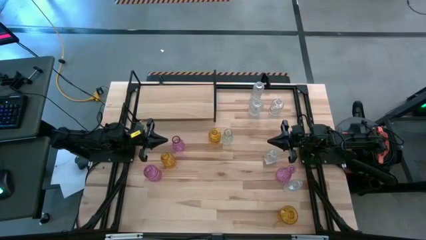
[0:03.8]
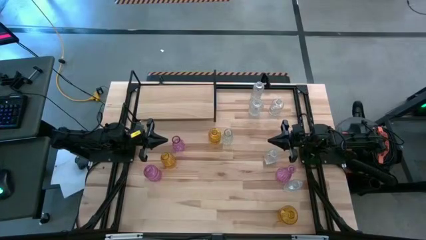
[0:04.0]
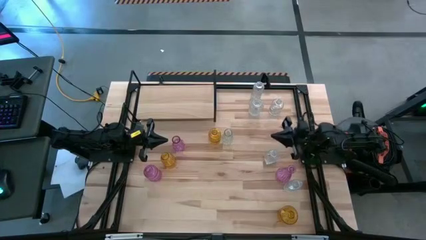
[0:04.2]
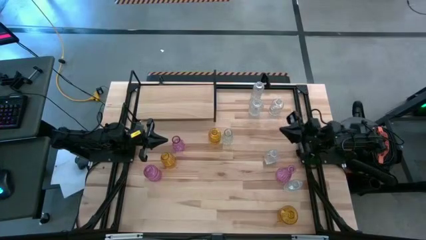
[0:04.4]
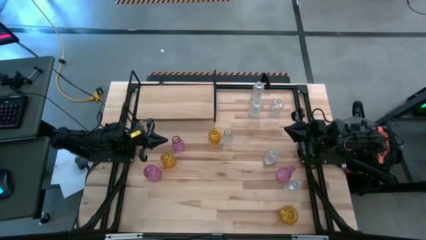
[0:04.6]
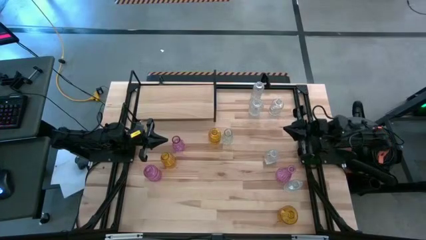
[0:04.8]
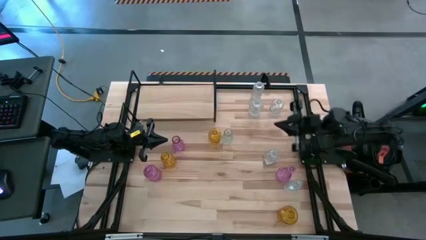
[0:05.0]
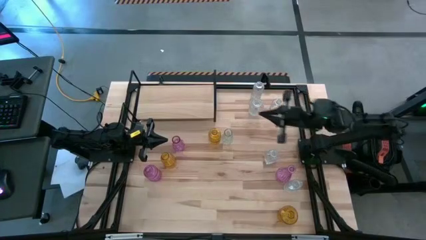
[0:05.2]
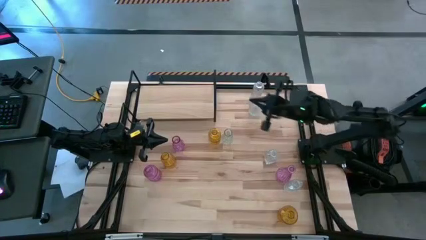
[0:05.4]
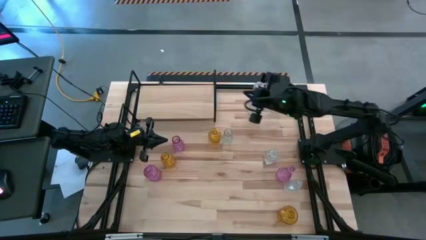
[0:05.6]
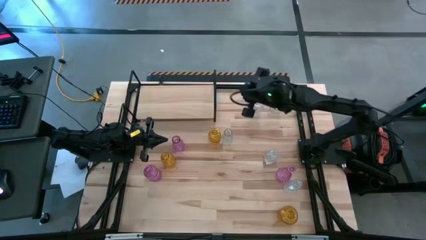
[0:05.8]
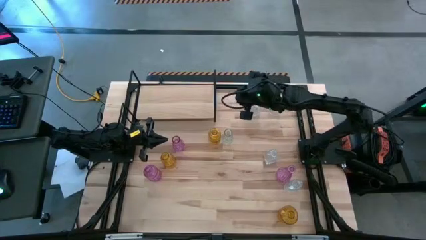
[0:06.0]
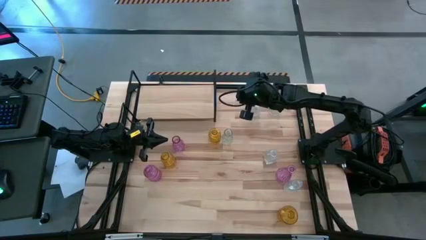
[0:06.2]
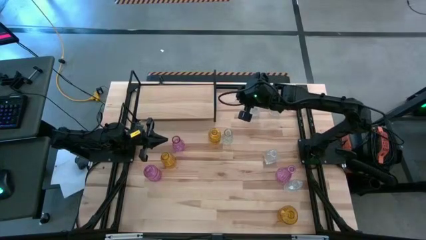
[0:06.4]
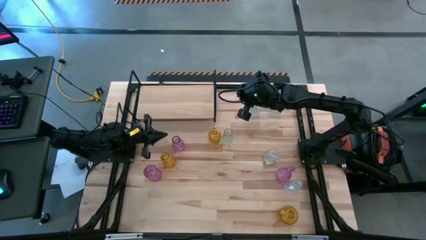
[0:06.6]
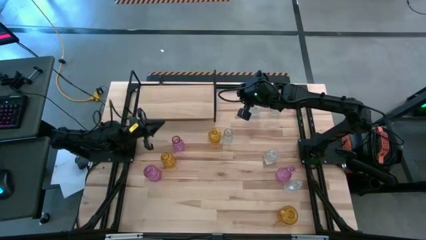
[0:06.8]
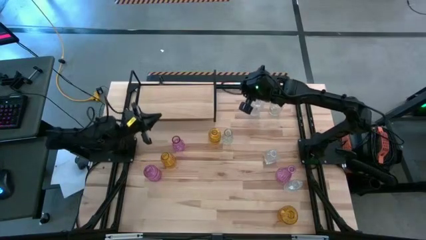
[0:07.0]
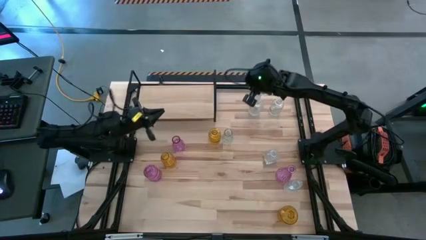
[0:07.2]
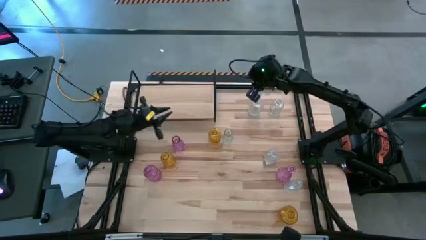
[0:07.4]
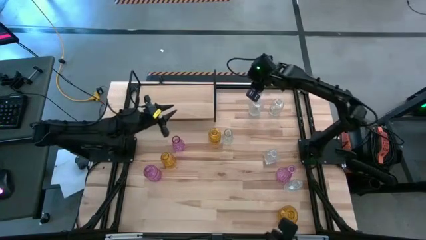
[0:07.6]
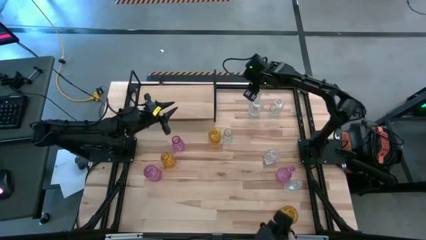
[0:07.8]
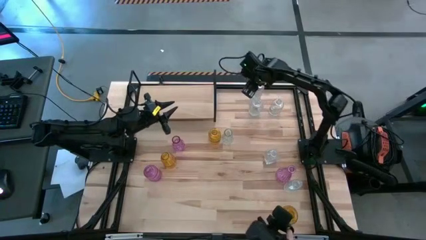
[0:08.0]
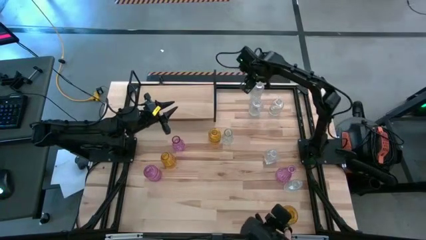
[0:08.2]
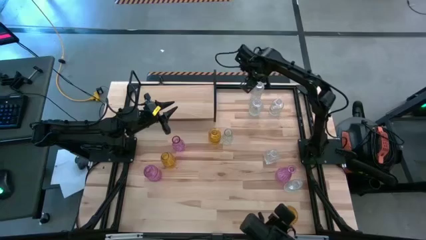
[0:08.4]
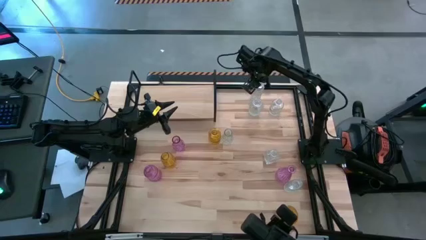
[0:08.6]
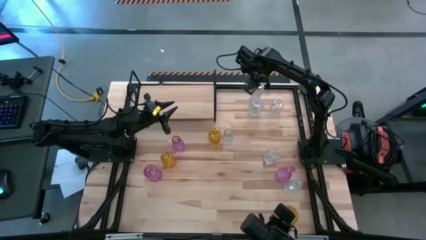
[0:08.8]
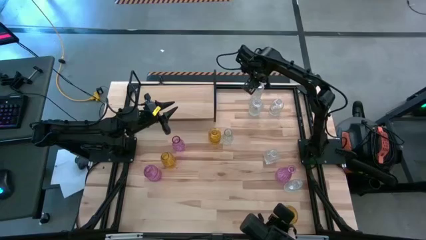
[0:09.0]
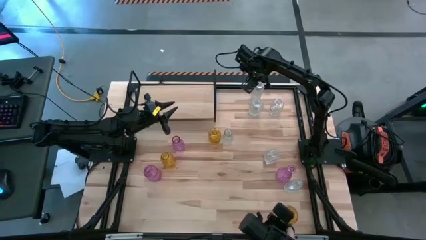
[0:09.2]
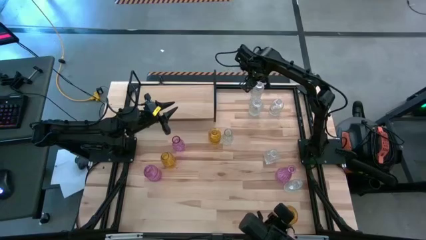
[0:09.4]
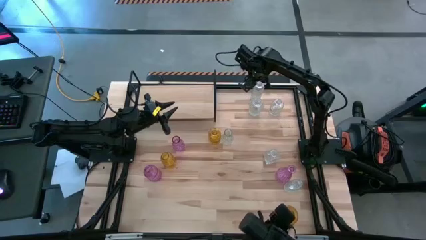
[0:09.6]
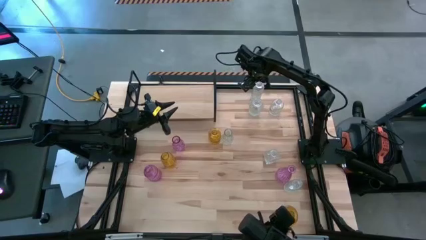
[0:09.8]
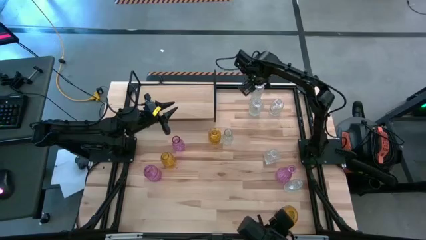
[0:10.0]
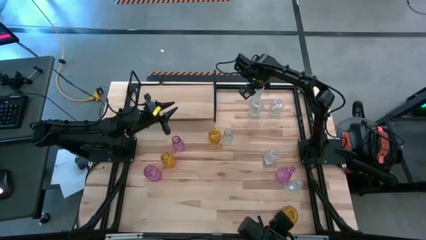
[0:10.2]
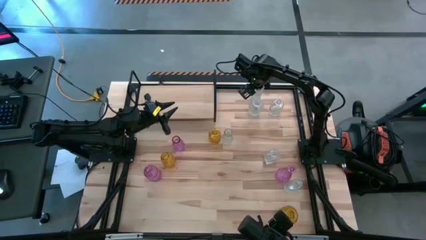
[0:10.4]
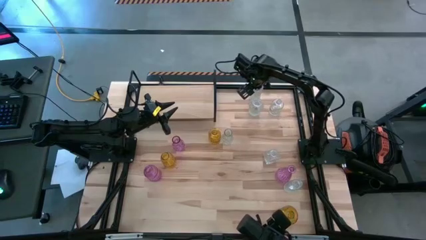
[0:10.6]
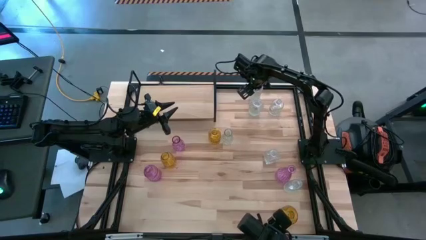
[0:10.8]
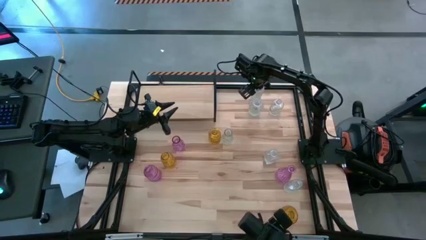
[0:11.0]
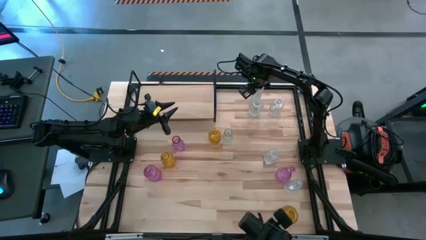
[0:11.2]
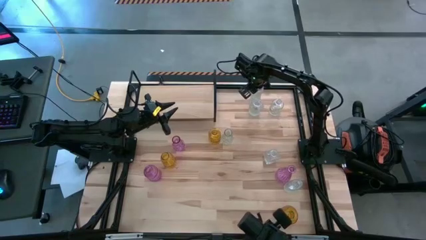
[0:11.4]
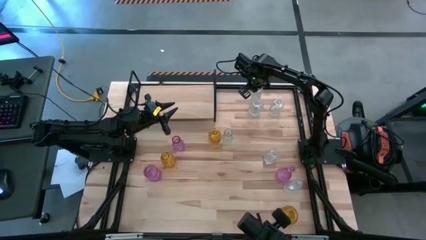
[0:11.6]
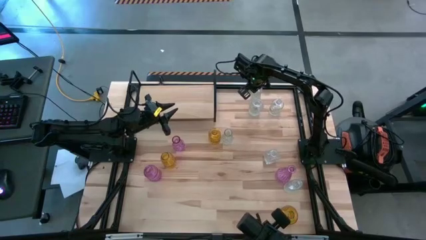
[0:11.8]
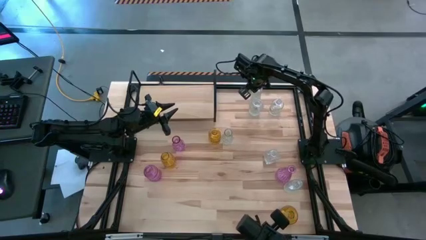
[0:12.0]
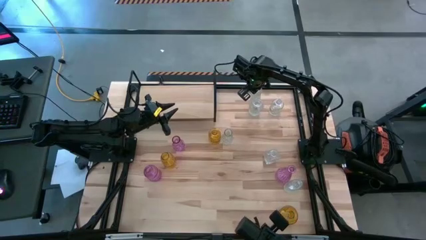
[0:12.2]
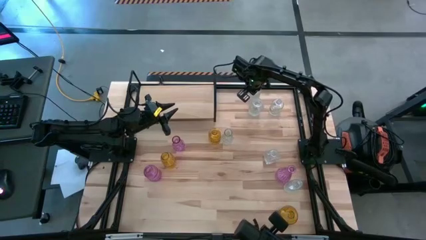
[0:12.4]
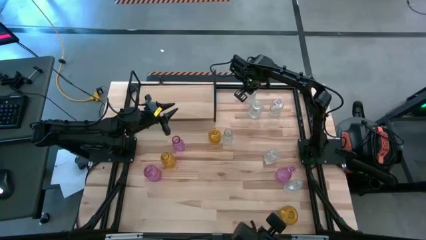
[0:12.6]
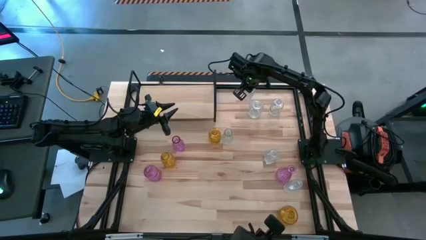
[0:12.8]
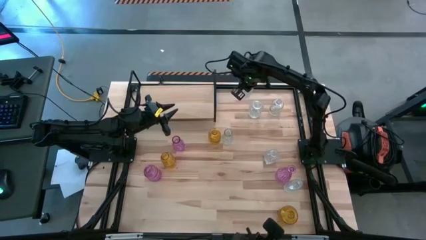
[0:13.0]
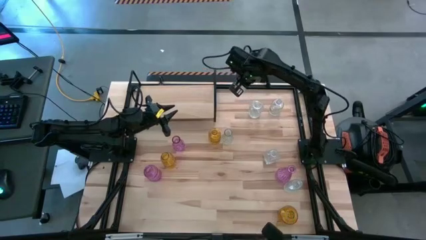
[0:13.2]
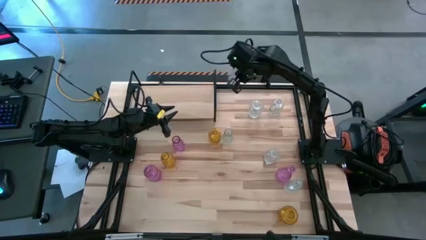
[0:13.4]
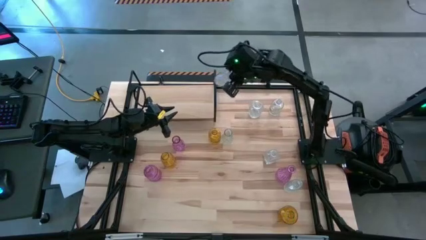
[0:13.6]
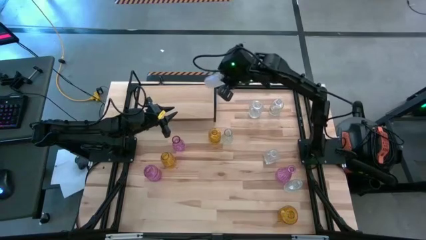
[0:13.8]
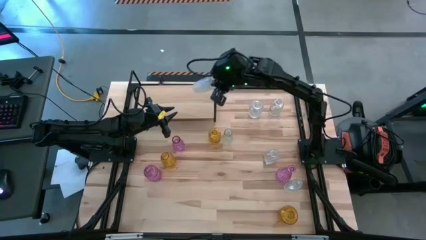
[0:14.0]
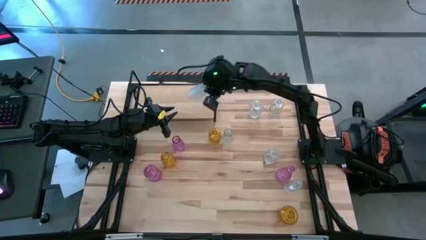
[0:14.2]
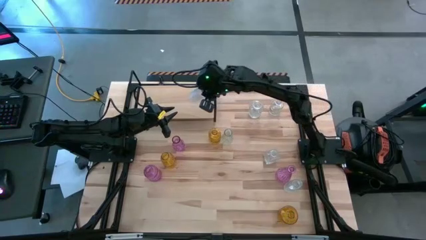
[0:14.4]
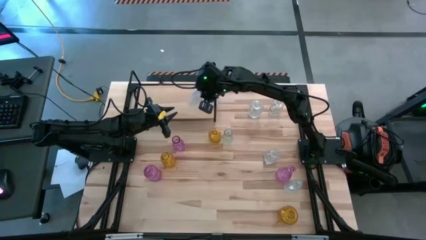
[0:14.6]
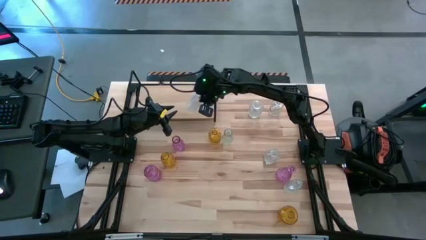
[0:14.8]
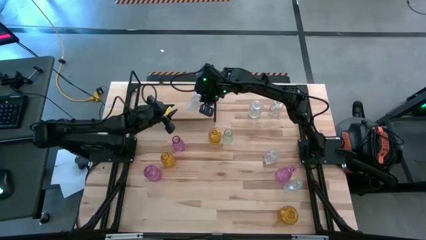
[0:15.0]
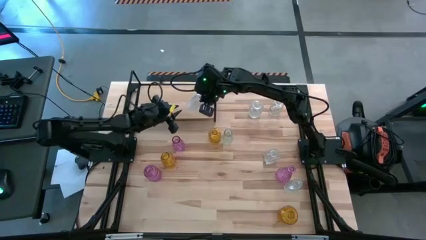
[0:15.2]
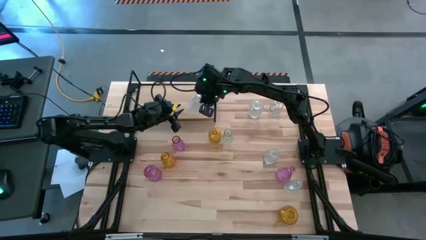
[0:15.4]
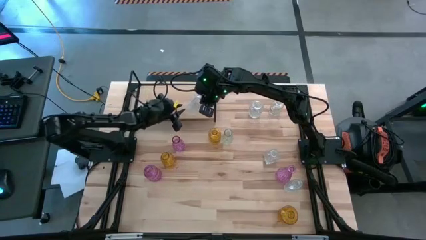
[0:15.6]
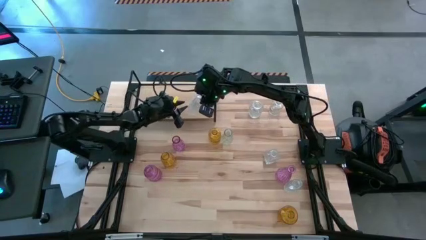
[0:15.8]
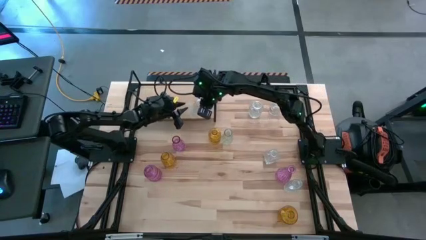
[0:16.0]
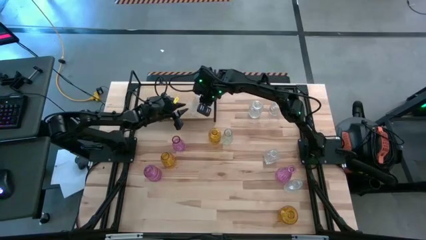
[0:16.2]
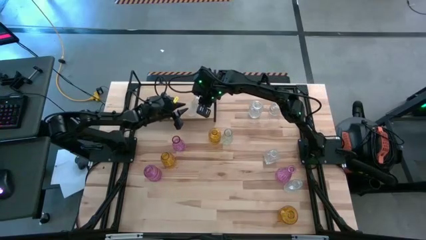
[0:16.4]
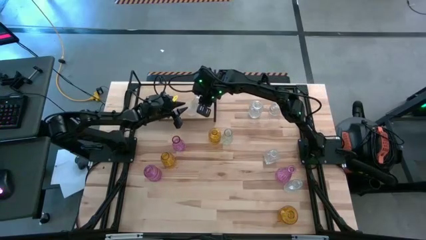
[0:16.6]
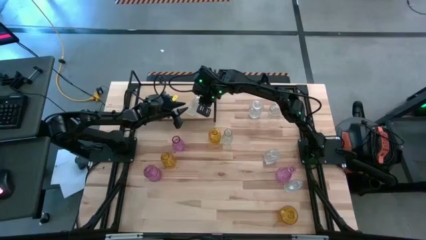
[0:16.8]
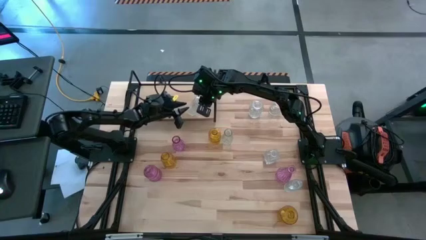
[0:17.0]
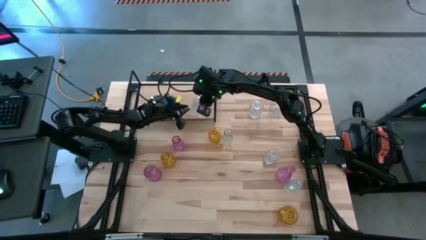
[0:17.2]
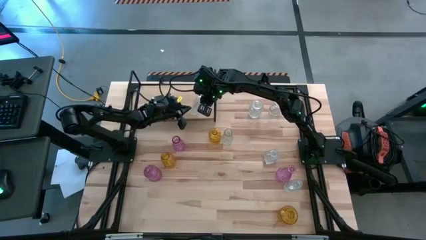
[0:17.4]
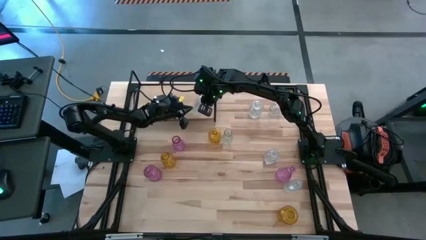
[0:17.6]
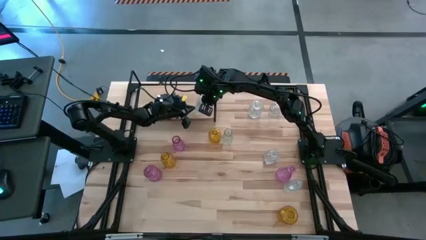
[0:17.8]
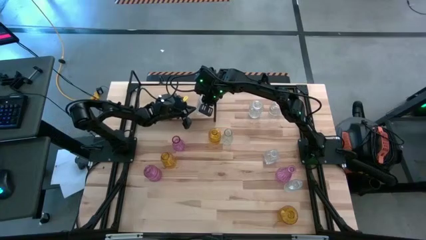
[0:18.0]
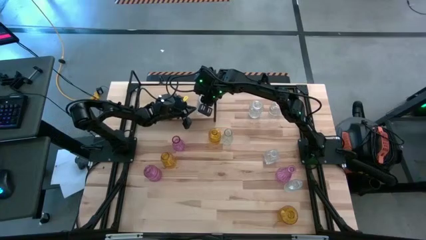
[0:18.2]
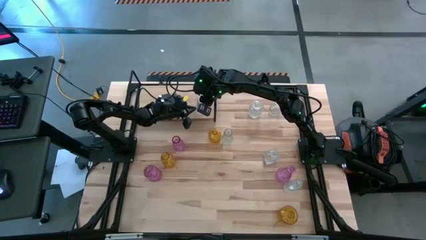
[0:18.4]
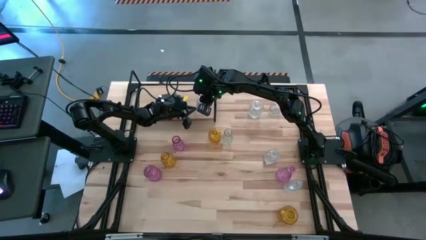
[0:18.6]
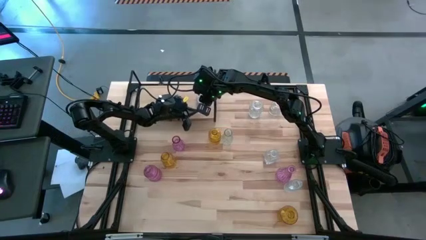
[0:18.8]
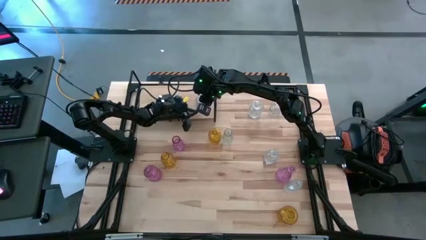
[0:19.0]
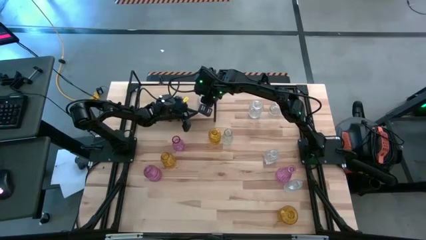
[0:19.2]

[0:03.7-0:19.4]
Task: sort vases onto shelf
Put the transparent vase in the top right corner of the shelf
